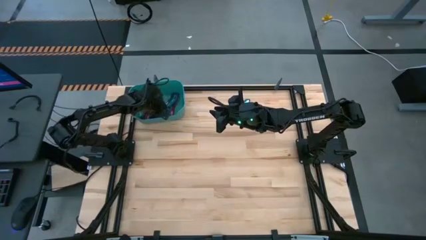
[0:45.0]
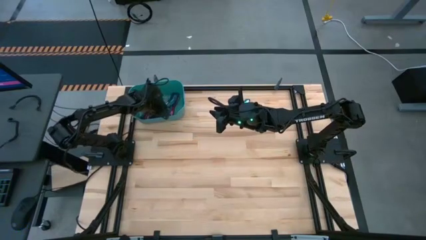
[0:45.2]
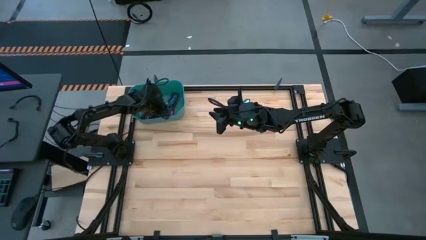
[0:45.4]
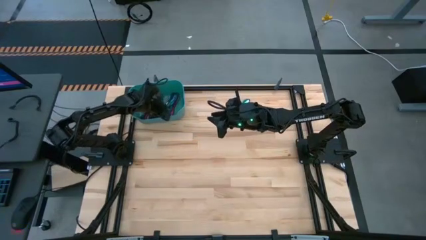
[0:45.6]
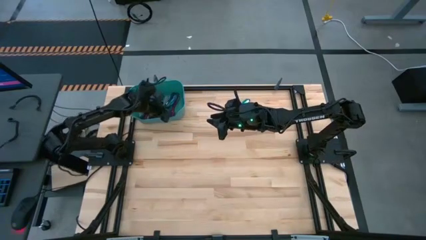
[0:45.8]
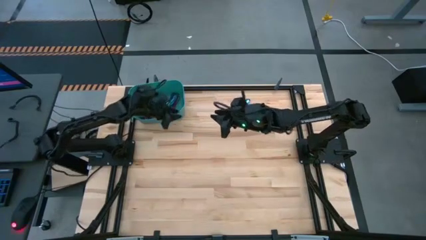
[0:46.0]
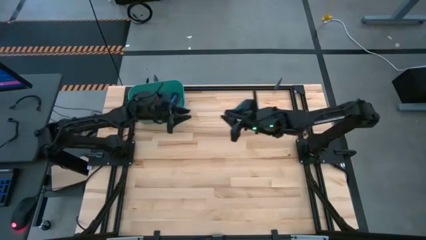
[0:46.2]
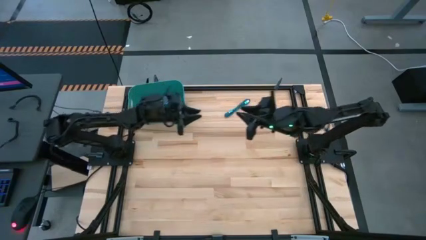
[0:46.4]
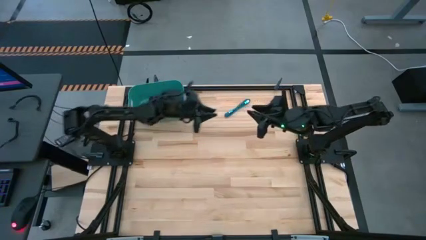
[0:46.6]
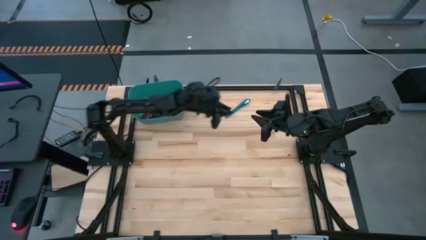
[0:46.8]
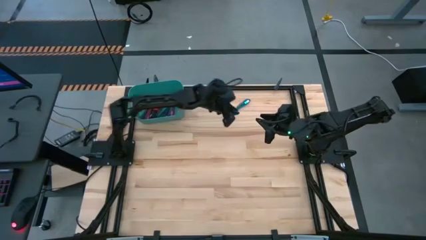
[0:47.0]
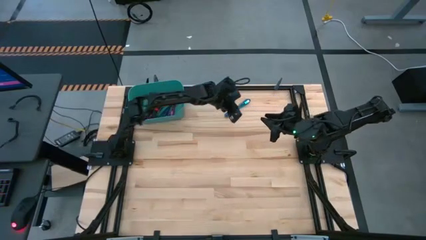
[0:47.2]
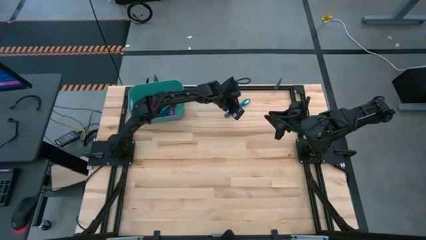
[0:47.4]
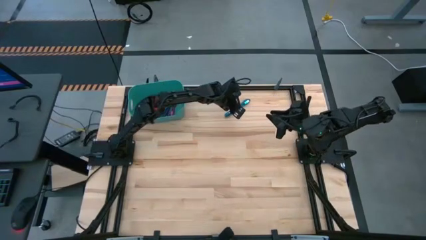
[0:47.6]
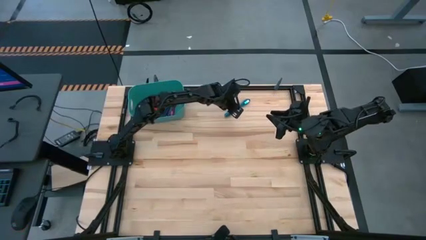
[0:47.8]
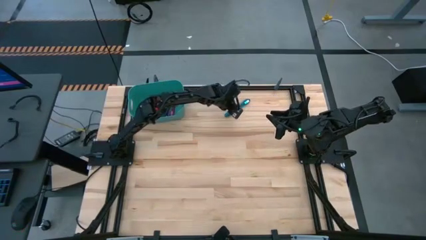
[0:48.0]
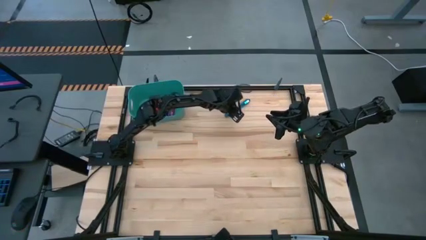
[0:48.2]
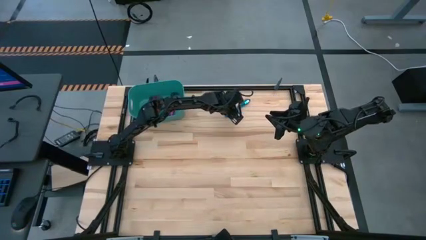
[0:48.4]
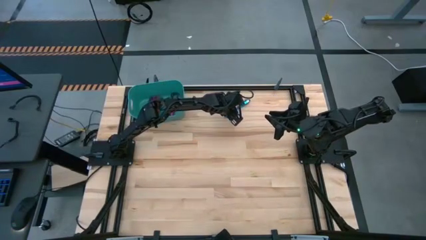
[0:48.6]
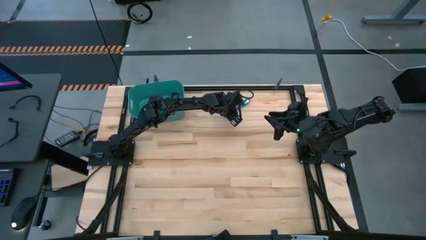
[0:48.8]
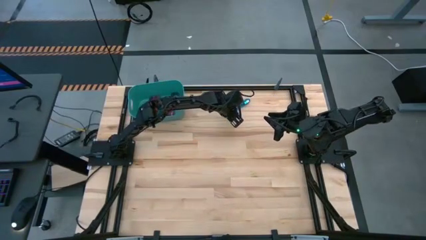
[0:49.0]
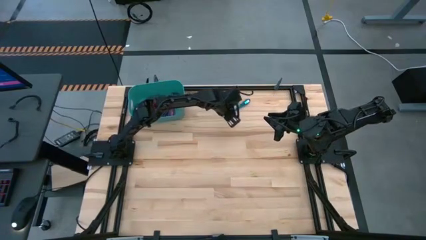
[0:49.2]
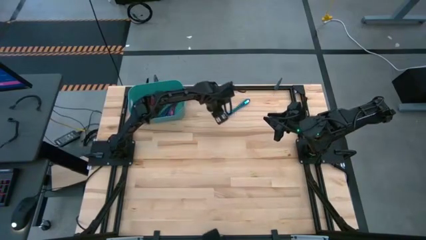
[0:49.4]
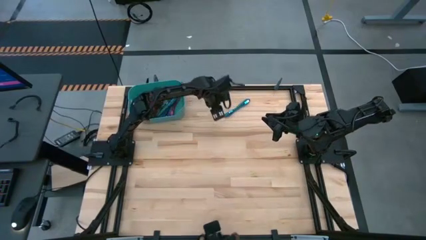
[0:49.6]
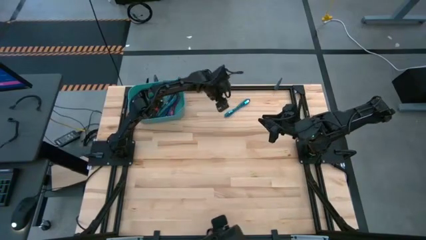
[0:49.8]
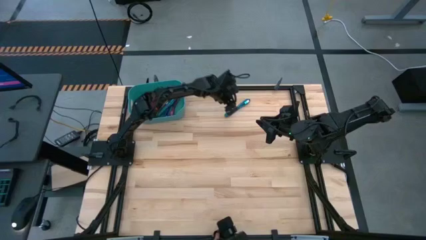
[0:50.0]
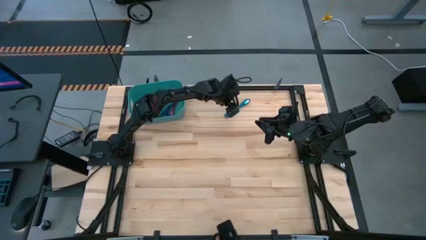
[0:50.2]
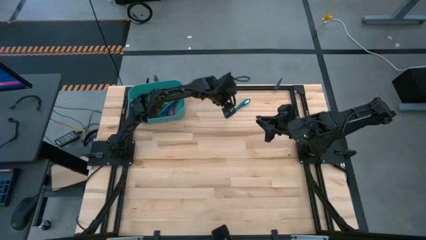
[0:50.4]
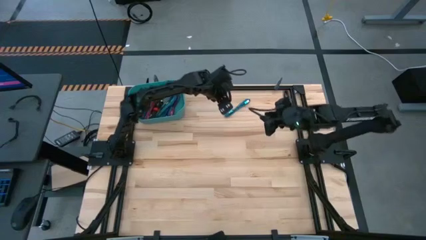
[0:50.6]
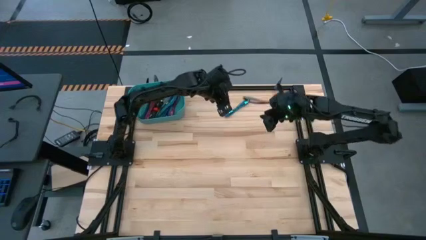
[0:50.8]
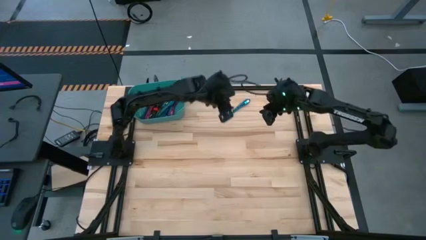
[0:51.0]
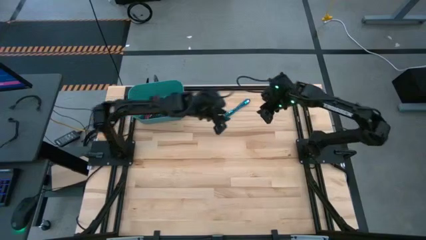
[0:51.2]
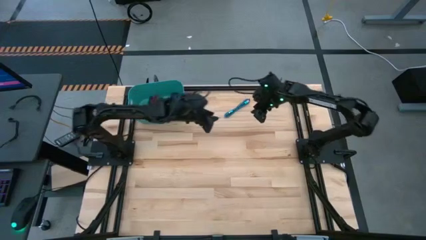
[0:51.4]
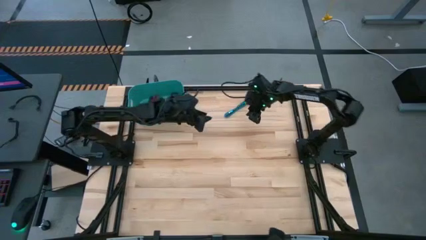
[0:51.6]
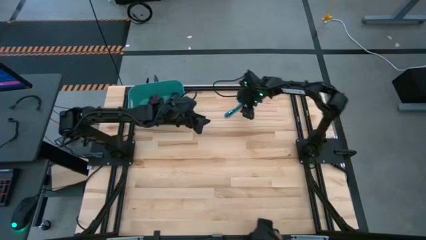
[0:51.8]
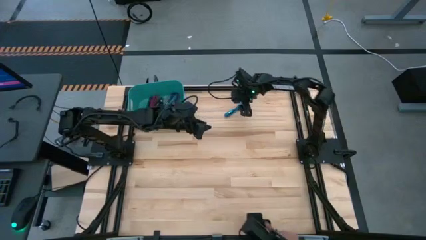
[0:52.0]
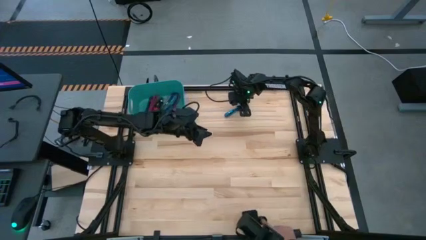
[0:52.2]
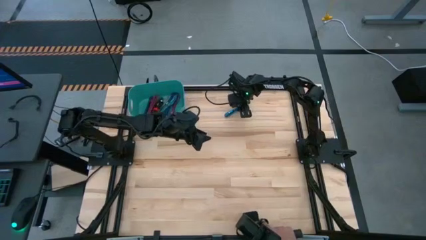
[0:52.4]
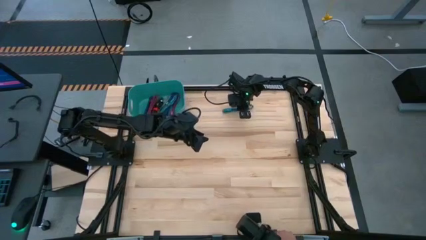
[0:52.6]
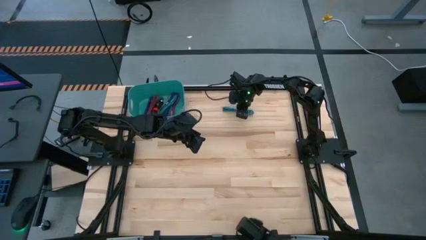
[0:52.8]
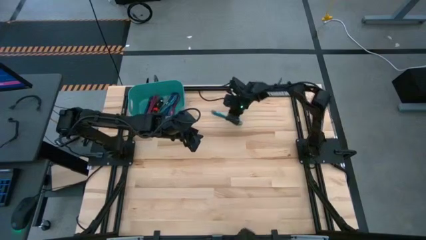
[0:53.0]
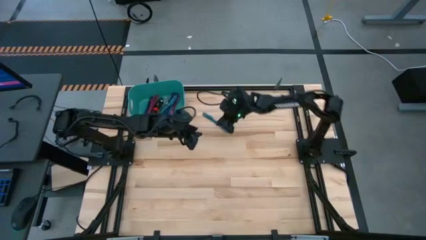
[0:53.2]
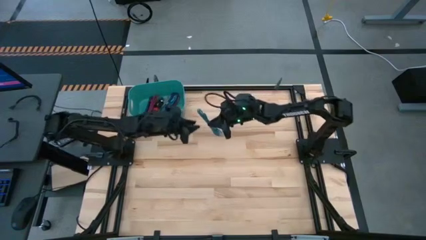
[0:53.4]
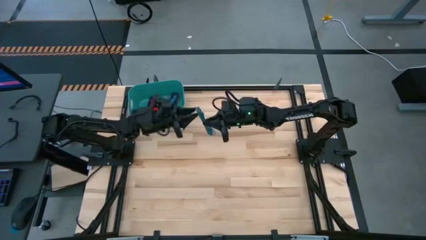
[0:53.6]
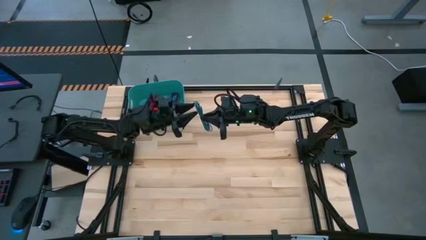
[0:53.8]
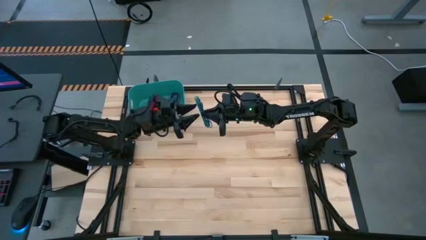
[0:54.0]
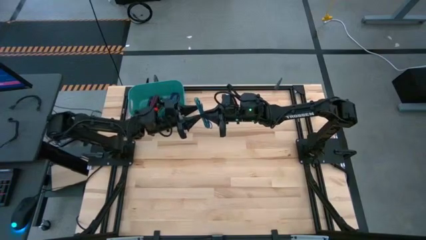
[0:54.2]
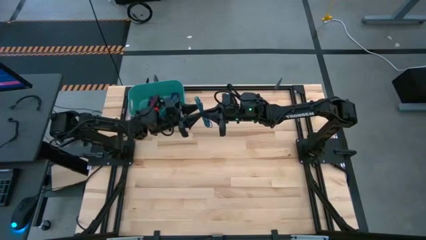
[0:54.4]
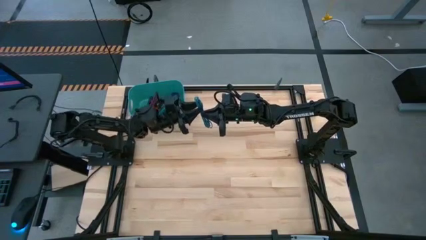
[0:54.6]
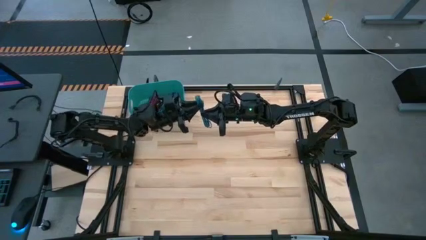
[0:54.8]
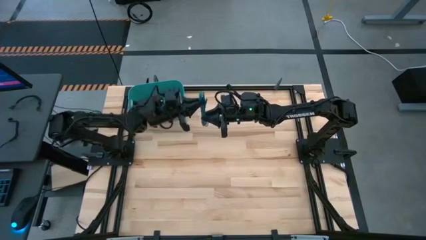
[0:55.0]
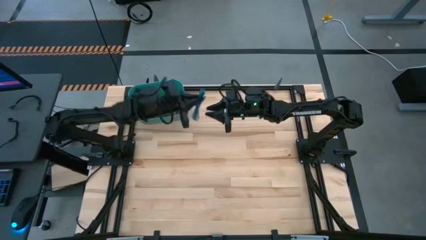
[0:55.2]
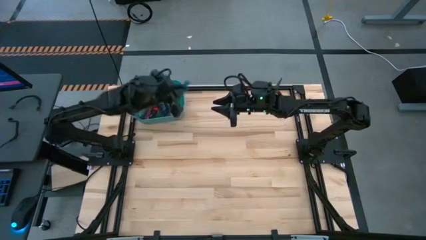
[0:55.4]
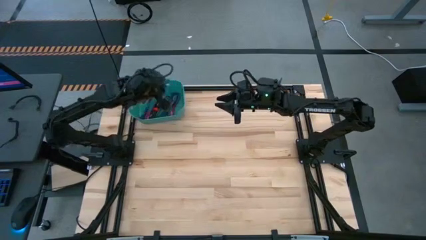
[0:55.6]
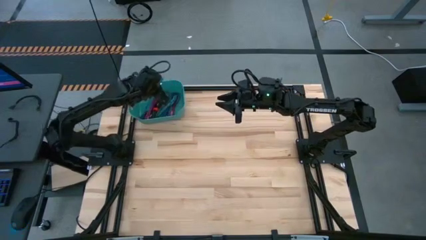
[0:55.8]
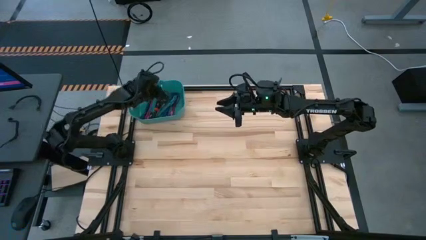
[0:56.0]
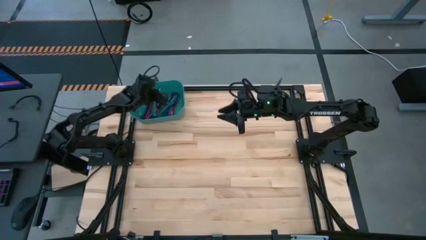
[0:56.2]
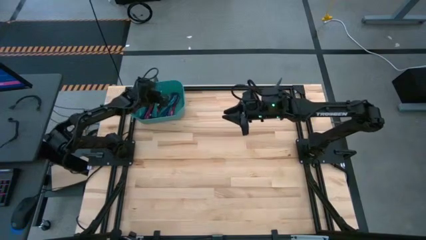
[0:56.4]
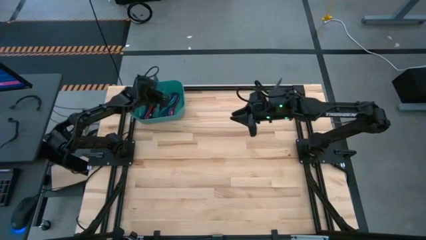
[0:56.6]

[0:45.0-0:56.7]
Task: Pick and place USB-C Cables
Put the blue charger cable into the green bin

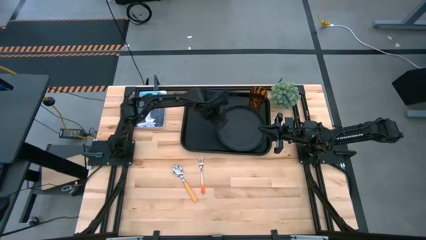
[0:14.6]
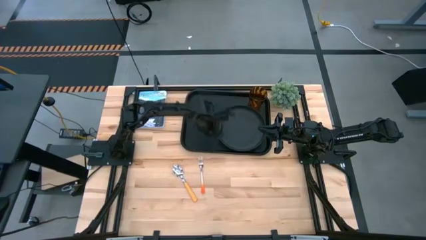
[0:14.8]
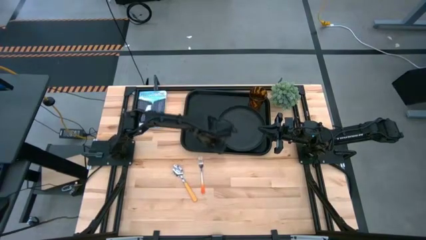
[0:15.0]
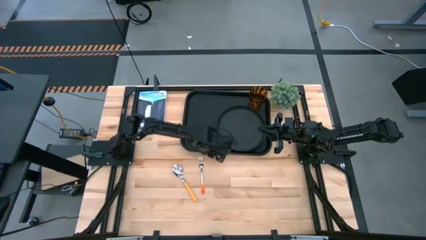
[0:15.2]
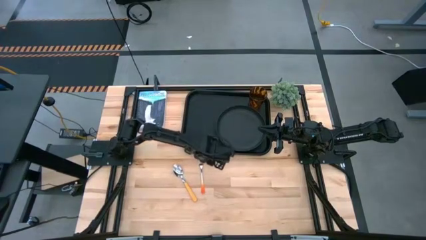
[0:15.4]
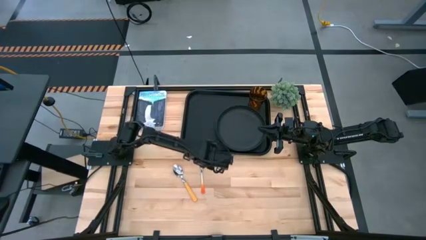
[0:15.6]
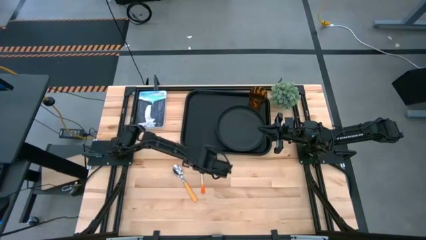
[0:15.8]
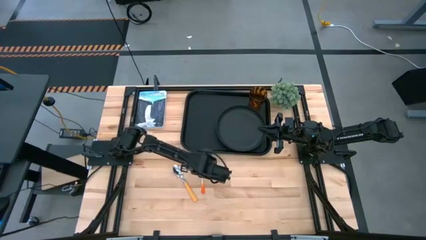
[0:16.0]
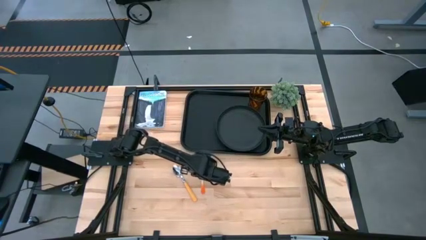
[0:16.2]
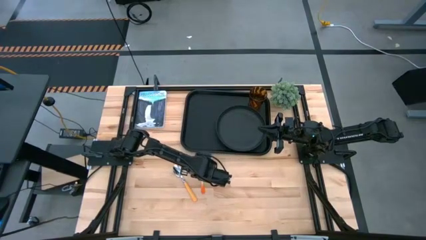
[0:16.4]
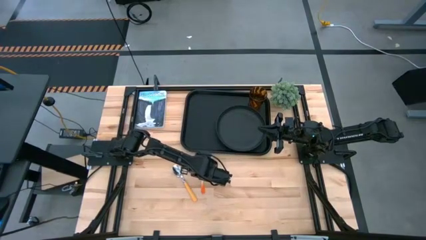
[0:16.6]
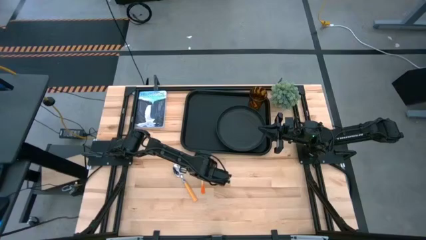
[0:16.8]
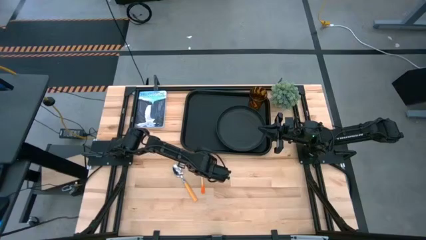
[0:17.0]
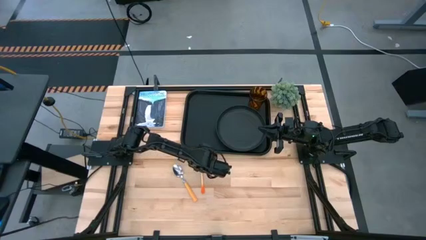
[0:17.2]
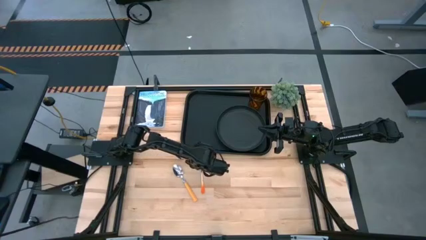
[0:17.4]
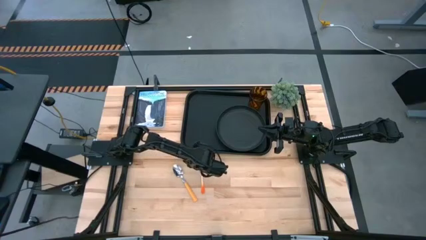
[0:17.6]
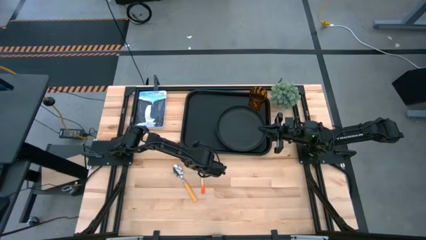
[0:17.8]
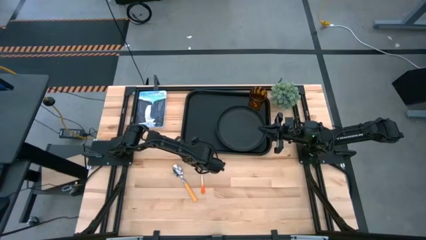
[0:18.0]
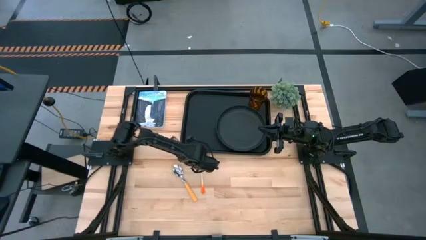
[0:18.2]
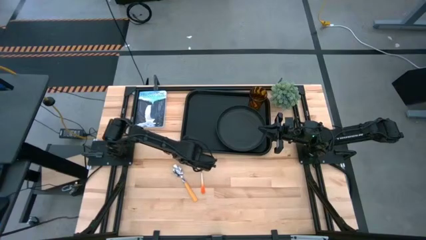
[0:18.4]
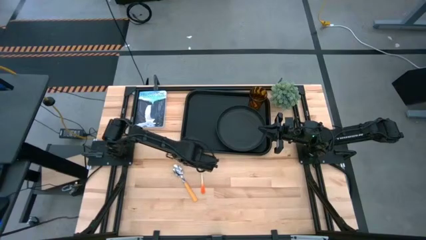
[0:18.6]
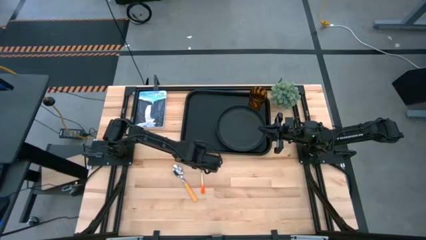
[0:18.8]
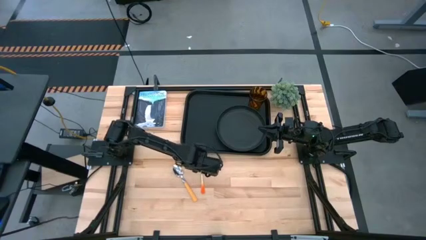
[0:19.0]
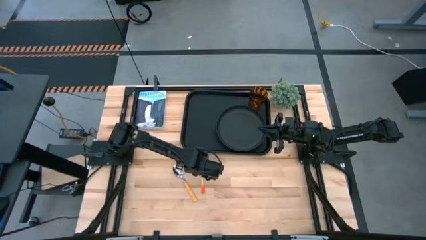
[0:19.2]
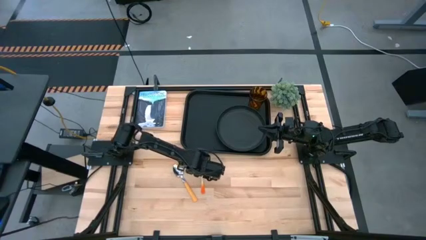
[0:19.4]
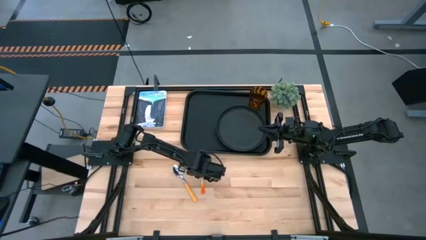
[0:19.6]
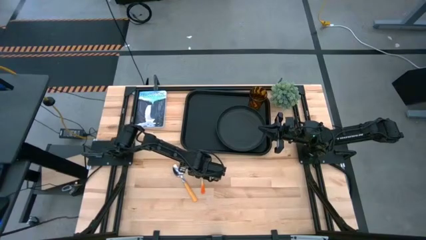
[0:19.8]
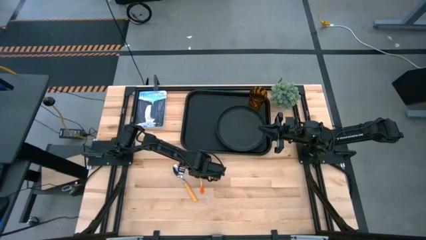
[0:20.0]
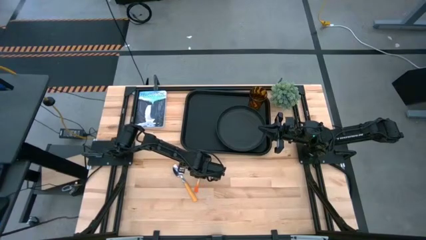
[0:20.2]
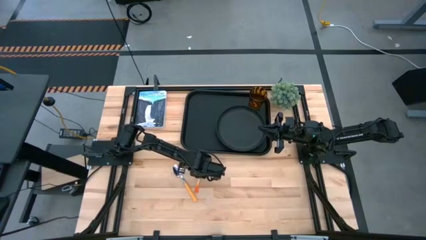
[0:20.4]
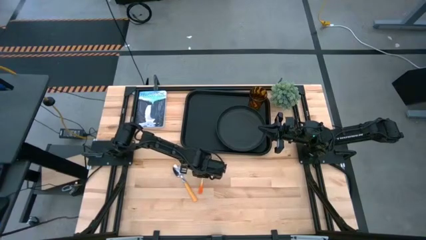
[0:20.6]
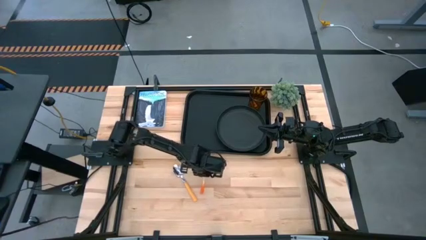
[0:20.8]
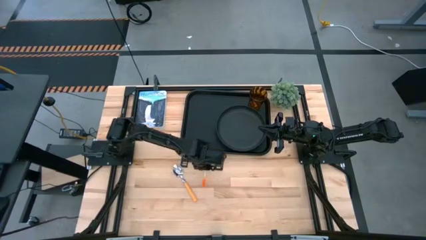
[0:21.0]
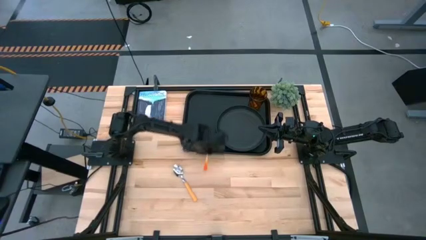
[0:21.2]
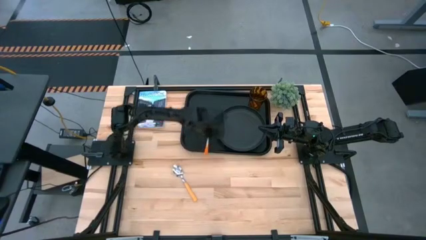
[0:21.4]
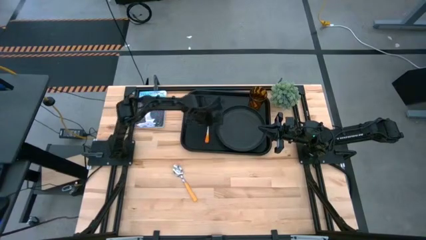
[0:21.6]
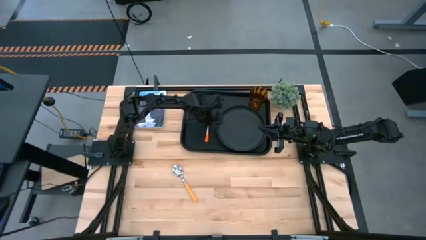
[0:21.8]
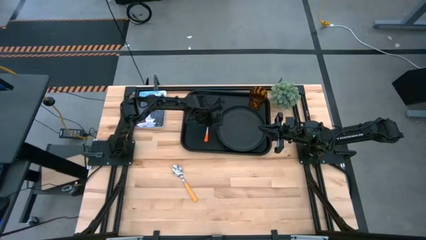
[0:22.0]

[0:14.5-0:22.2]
Task: Pick and place plate/cup/fork/spoon on tray
Put the orange fork on the black tray to the left of the black plate
